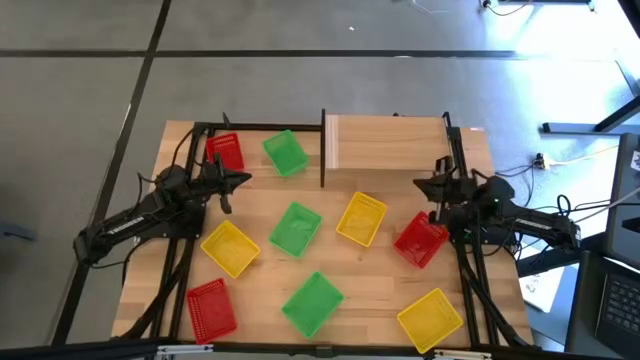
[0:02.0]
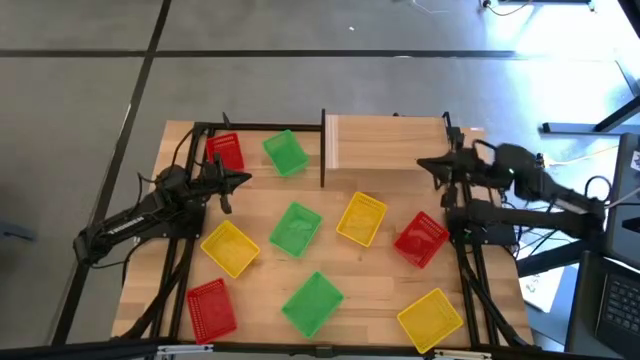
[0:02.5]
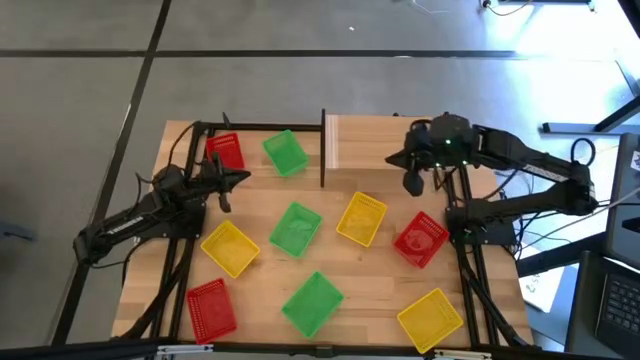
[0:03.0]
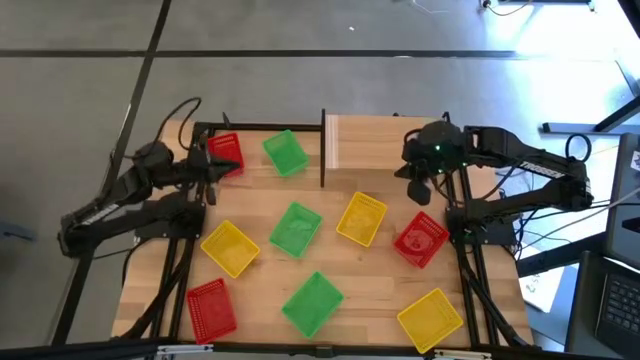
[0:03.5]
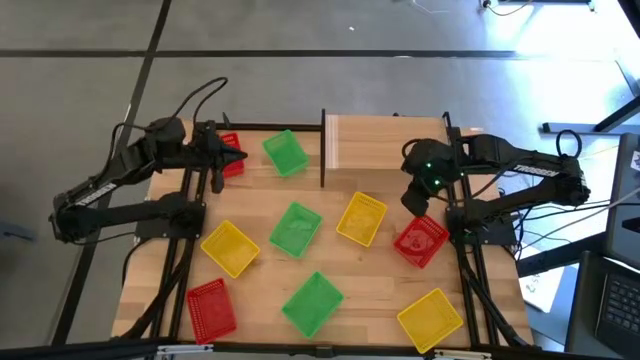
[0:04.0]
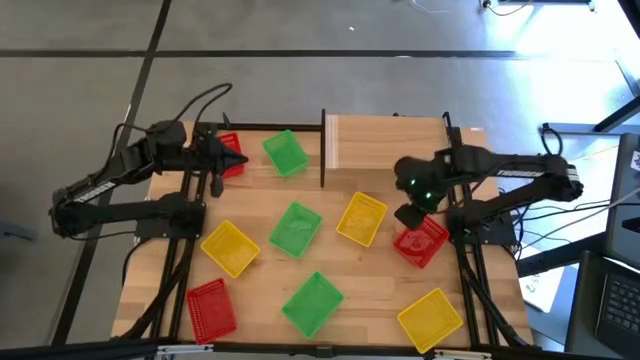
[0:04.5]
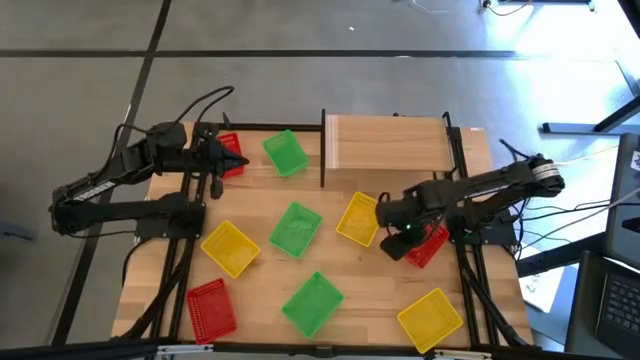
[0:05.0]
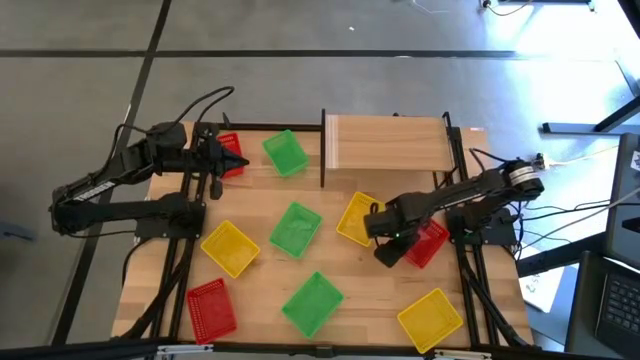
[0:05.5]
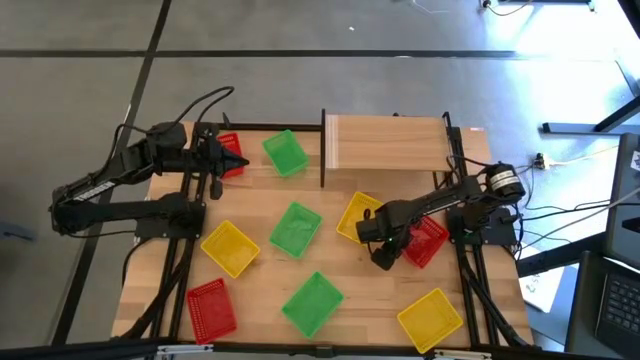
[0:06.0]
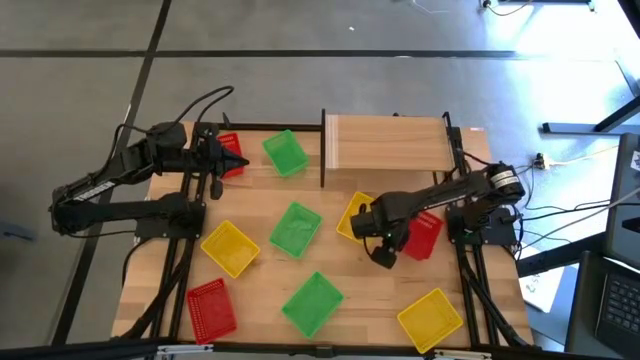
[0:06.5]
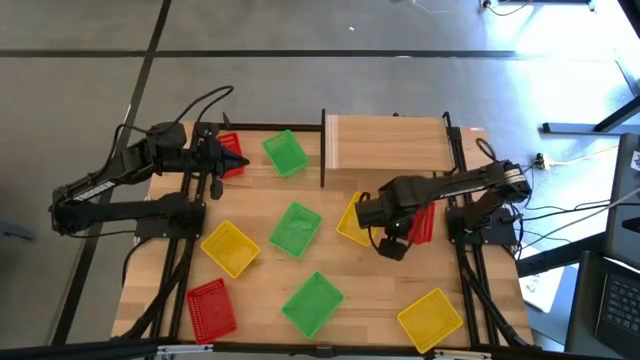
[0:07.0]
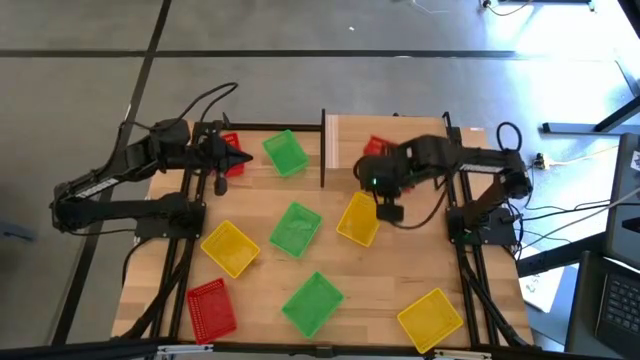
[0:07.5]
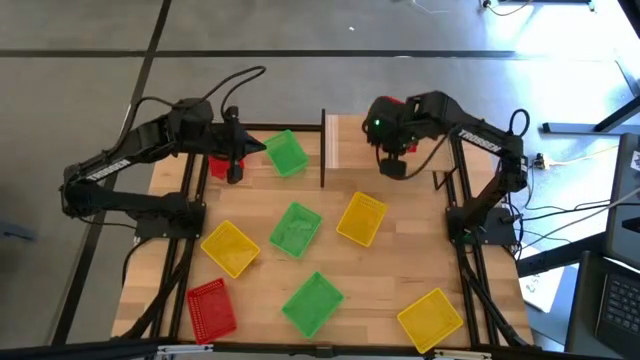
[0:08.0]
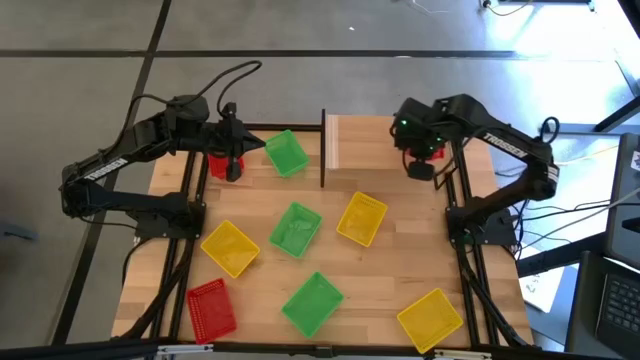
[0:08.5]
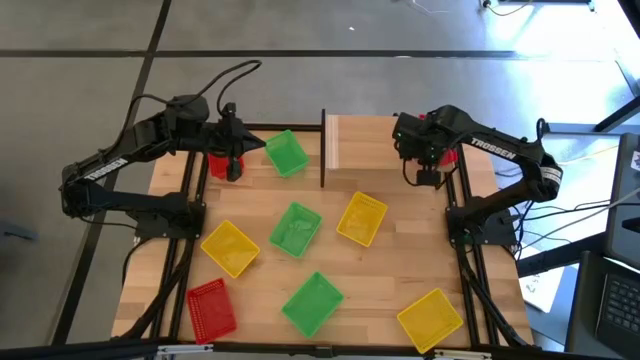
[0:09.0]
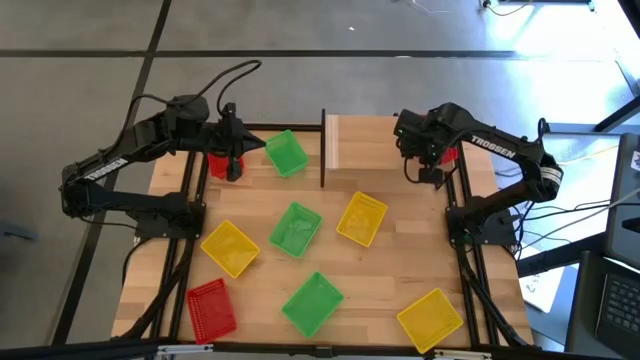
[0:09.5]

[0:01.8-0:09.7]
Task: Stack baskets on shelf by color
Put the right red bin on the shelf

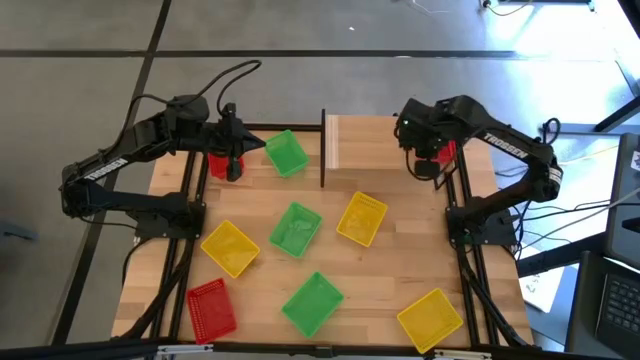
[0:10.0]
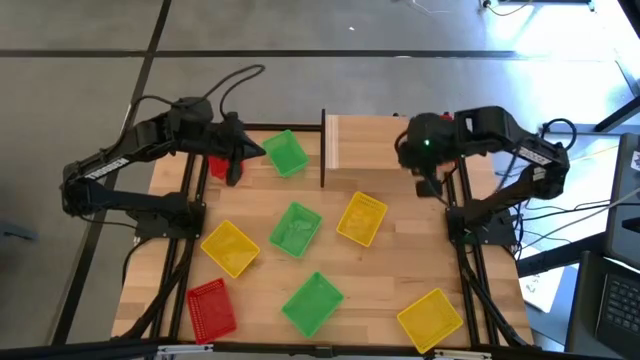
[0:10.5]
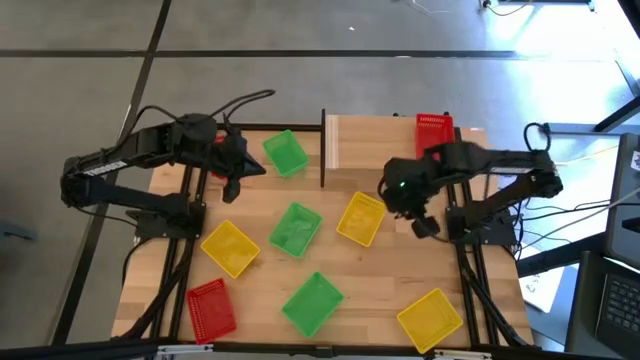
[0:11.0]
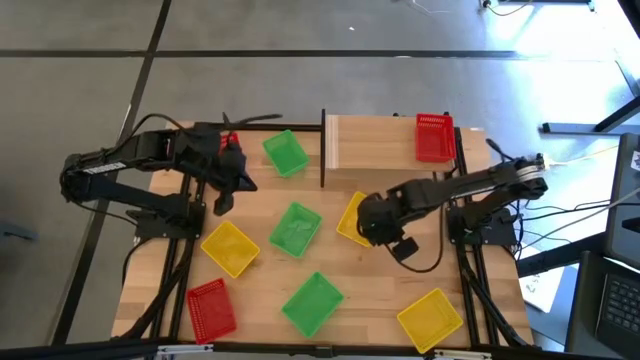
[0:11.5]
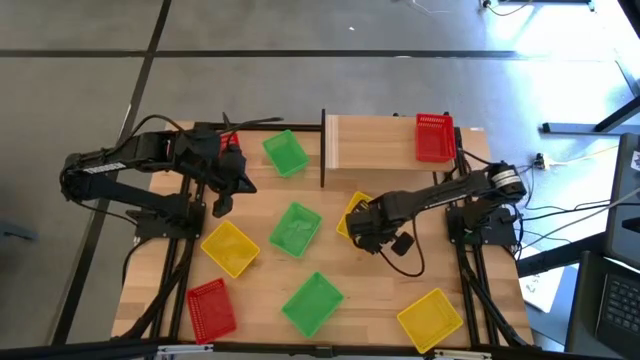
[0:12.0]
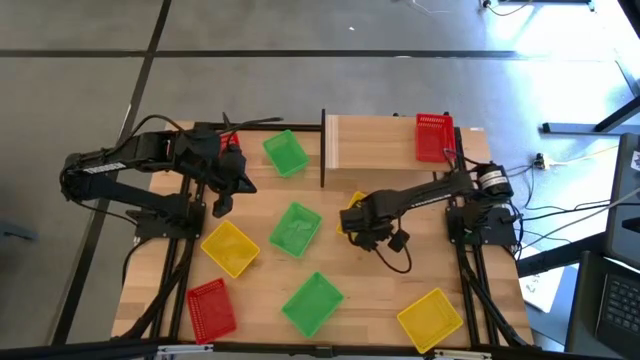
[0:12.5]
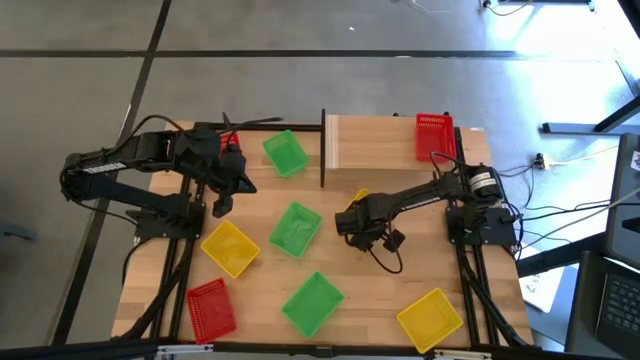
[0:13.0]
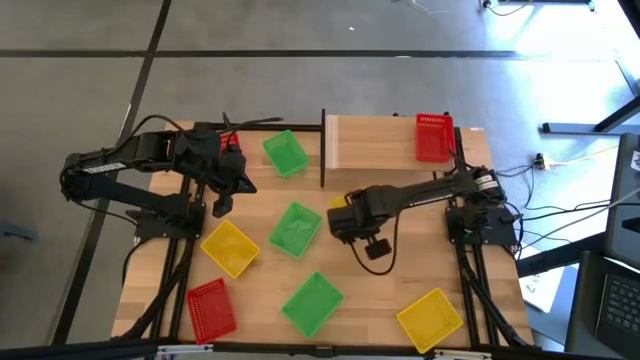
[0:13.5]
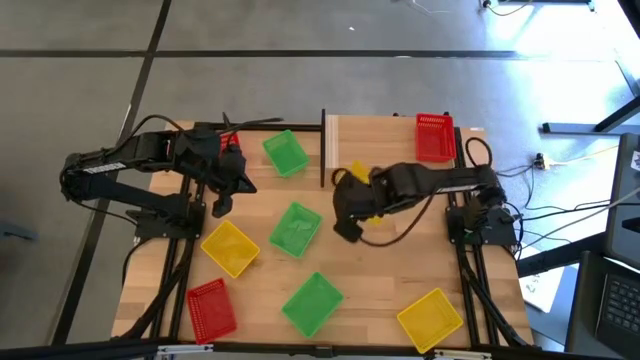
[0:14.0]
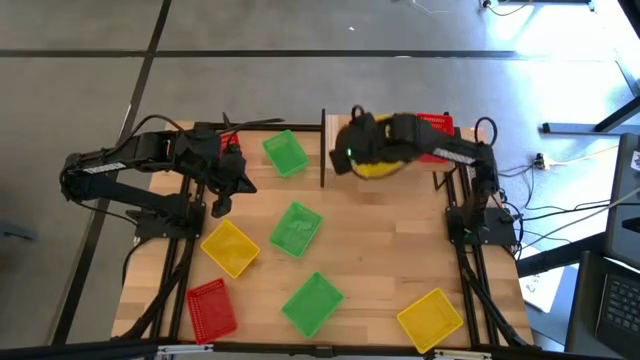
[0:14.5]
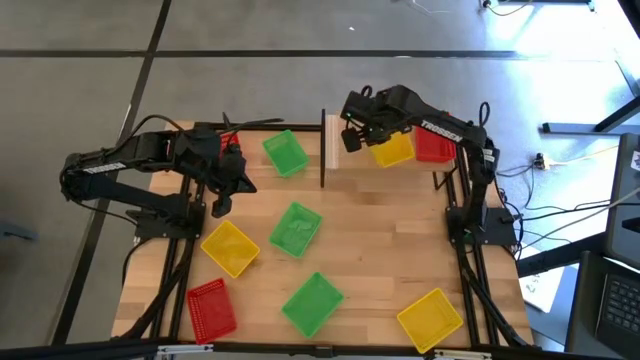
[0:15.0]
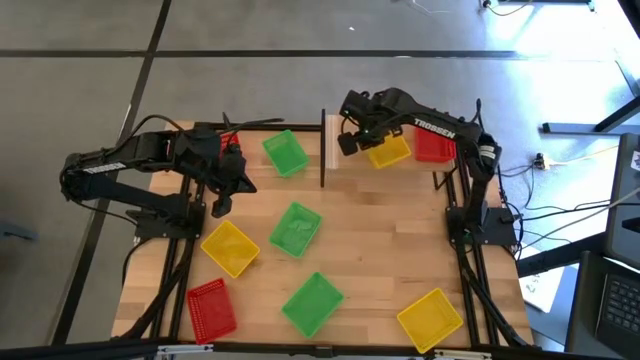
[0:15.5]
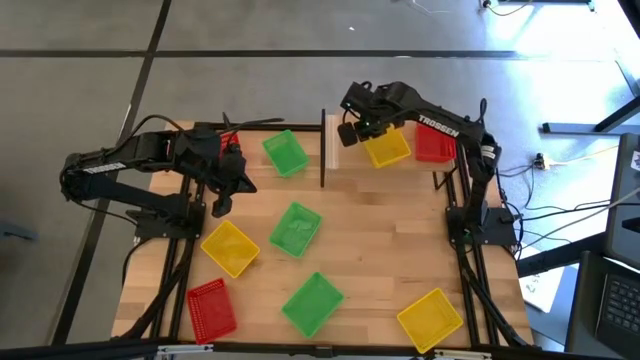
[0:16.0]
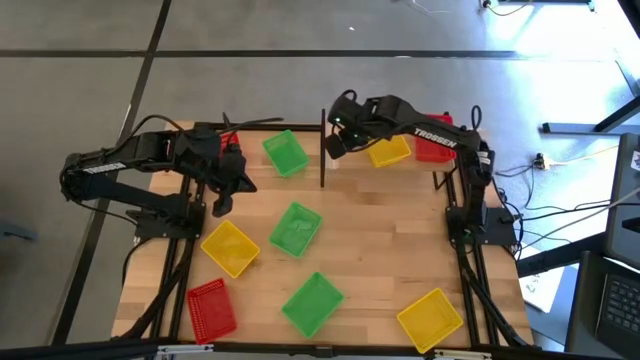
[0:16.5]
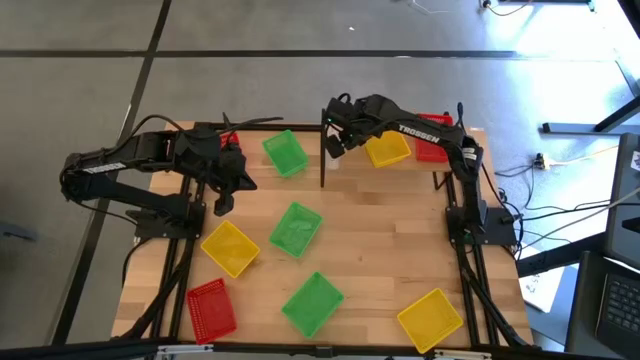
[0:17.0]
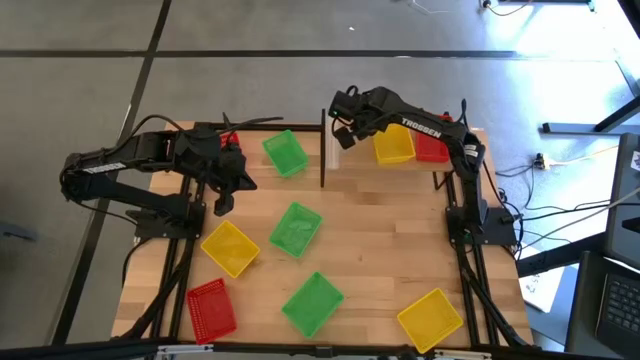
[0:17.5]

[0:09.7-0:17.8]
Put the middle yellow bin on the shelf

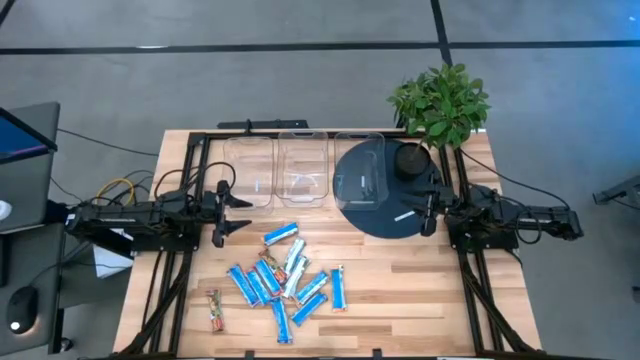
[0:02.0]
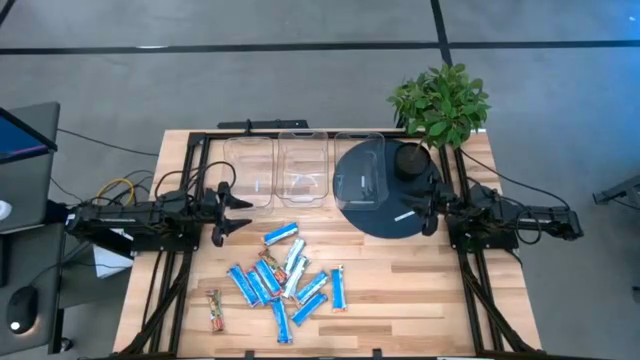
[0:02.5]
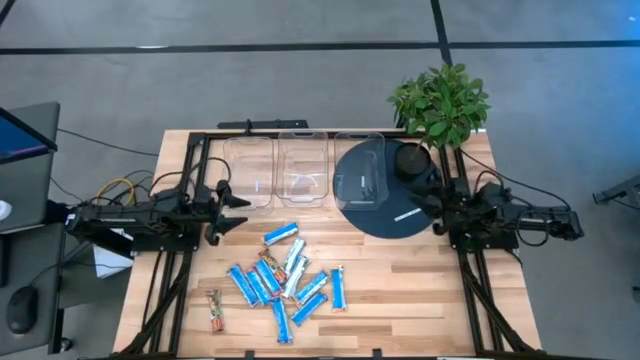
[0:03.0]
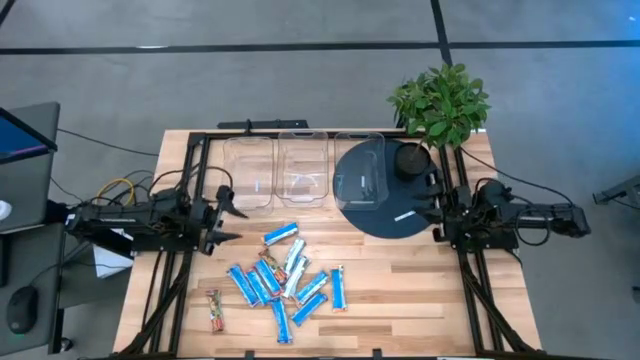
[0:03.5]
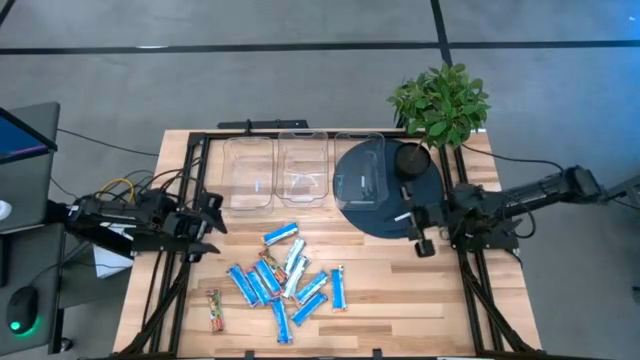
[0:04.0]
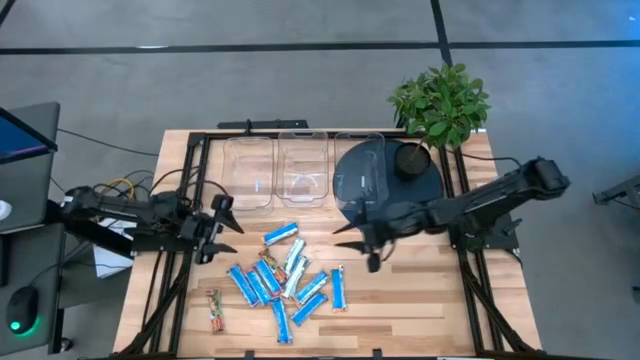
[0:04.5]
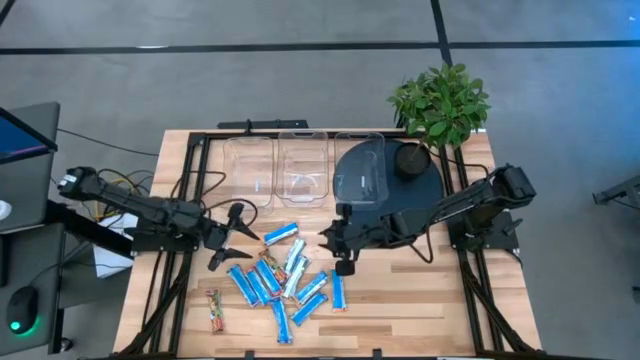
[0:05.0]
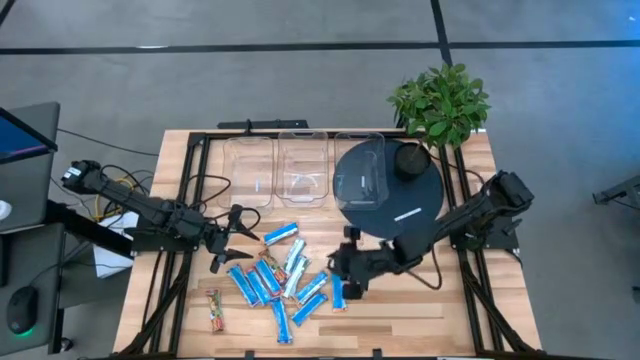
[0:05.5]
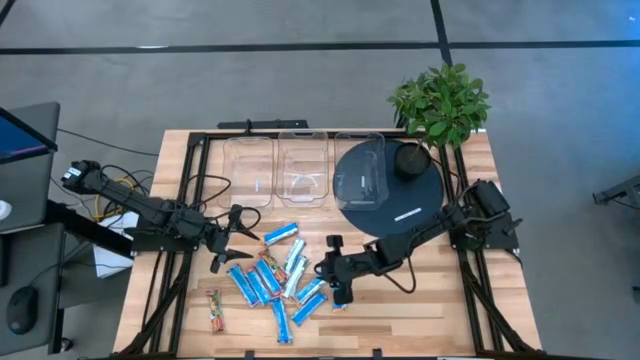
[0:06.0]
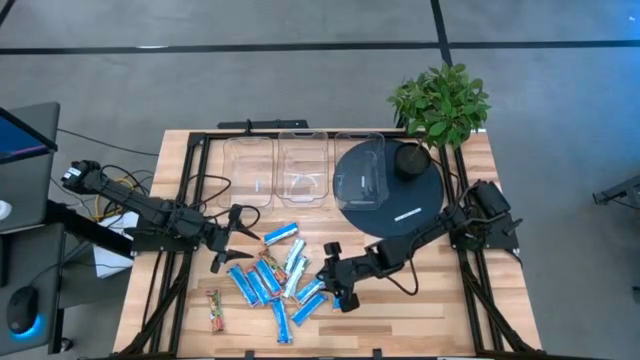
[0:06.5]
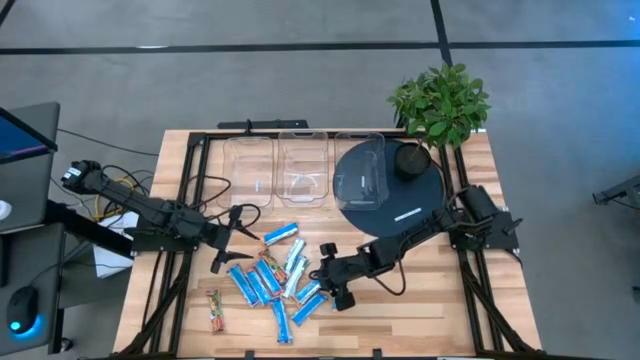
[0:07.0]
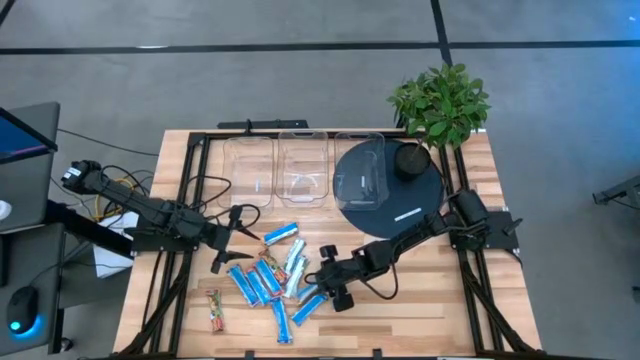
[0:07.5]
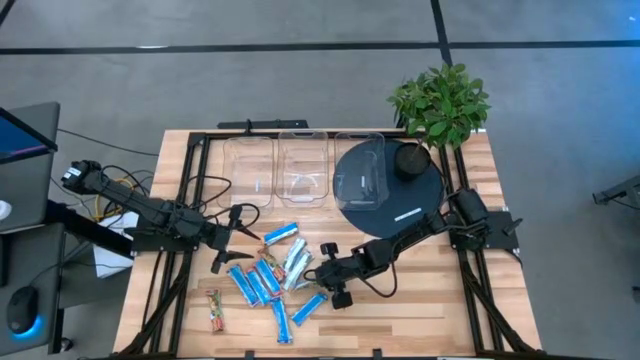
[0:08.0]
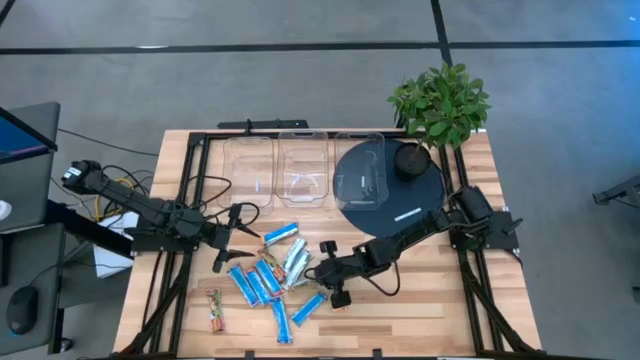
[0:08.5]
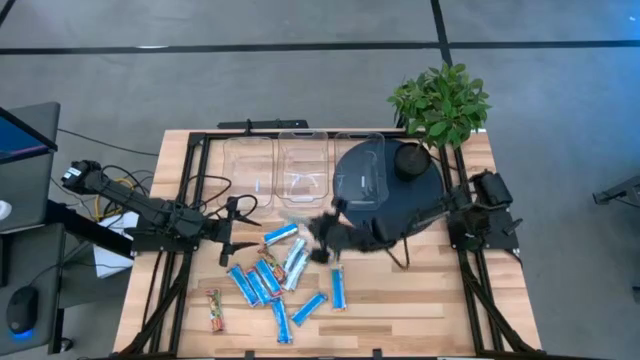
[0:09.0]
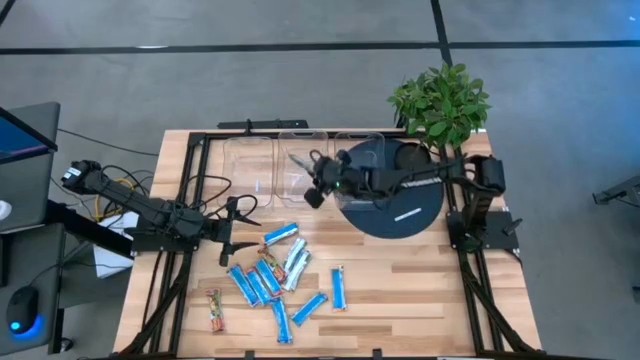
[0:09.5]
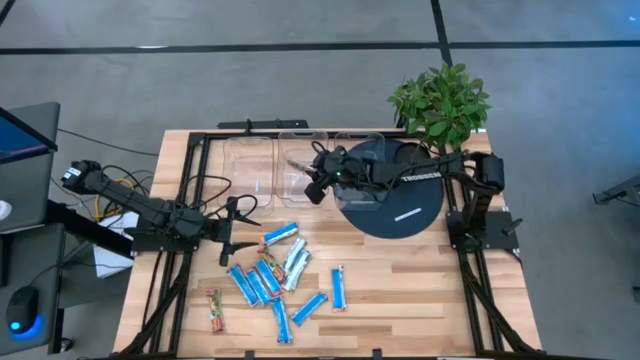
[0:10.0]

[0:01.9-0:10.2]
Task: Pick and place Granola Bars by type
Put the orange granola bar into the middle transparent bin
